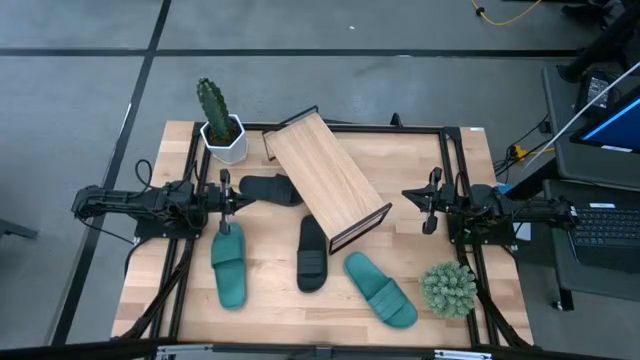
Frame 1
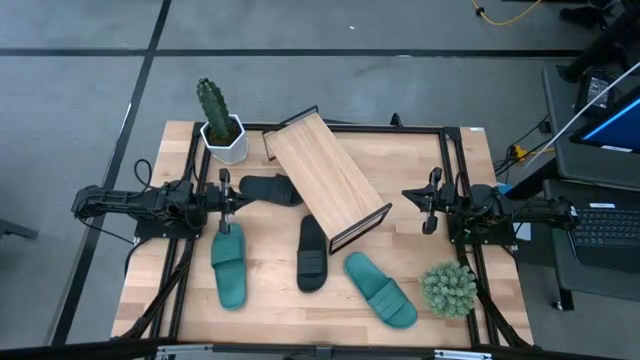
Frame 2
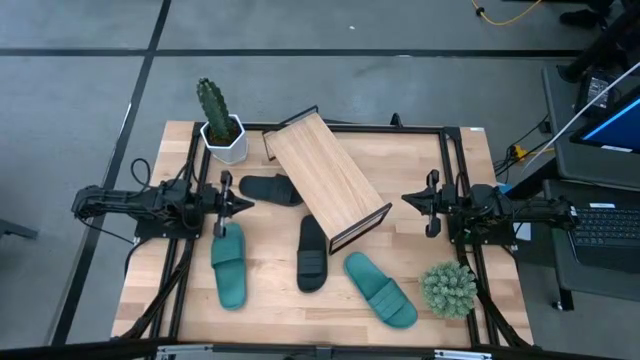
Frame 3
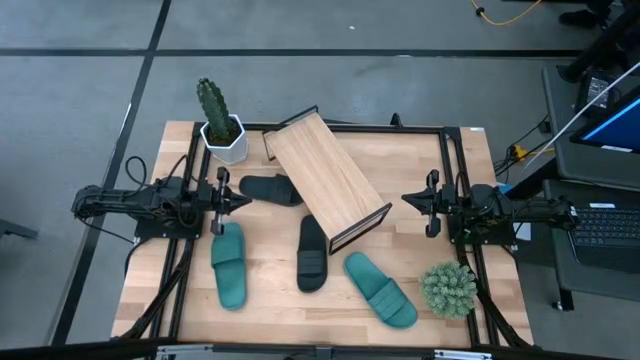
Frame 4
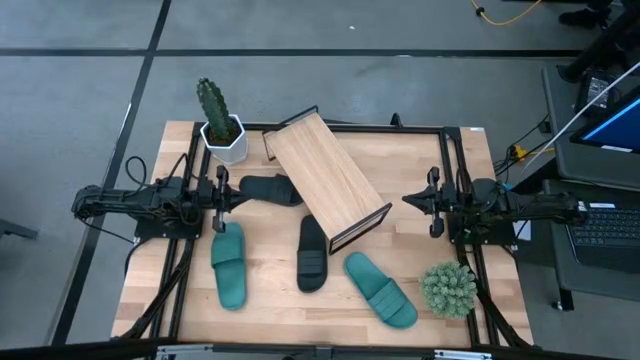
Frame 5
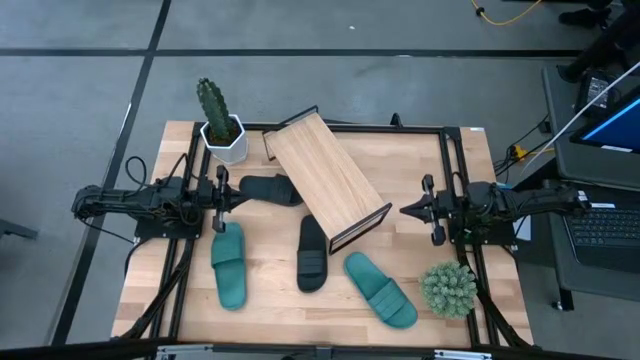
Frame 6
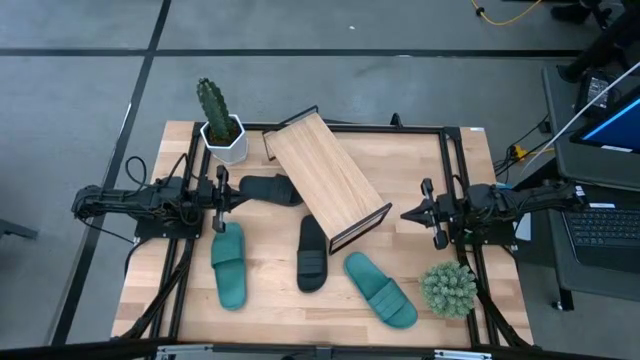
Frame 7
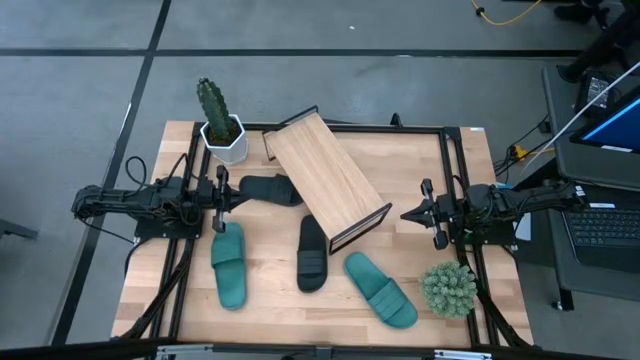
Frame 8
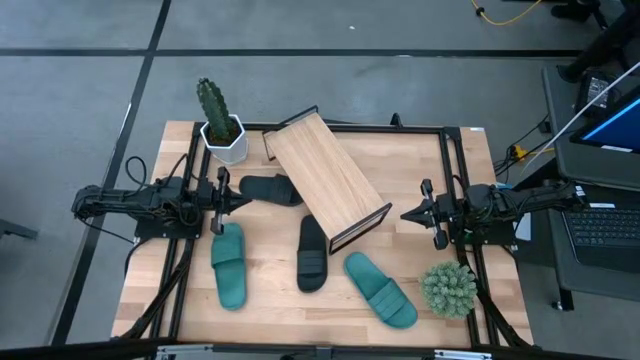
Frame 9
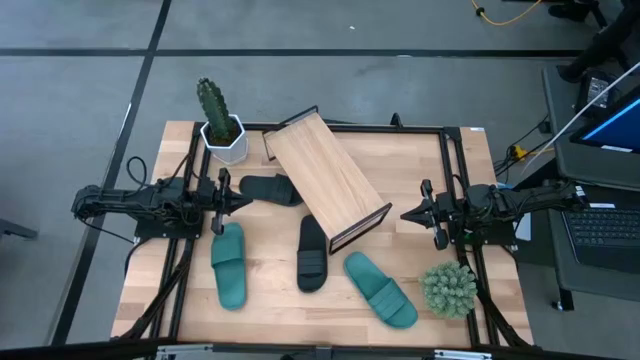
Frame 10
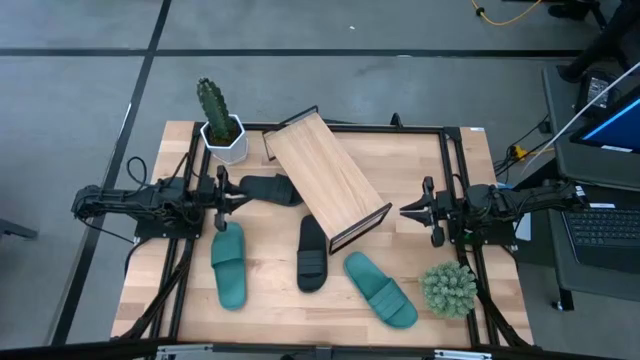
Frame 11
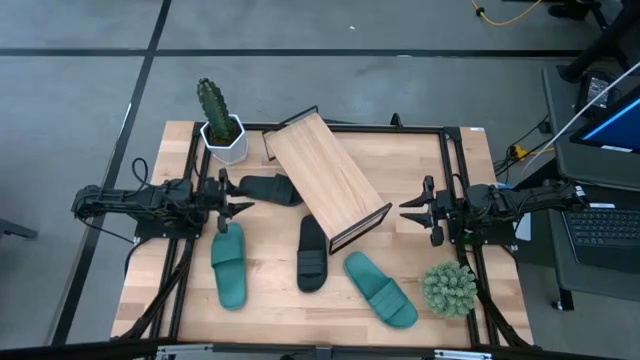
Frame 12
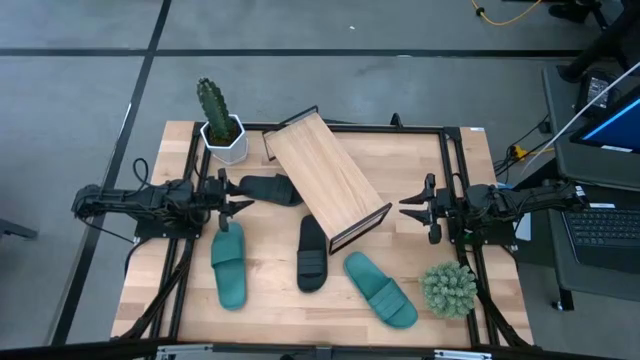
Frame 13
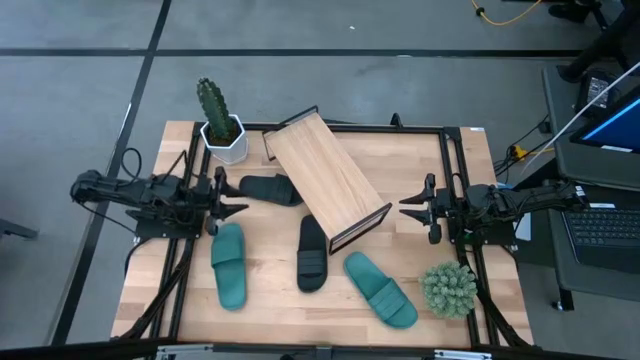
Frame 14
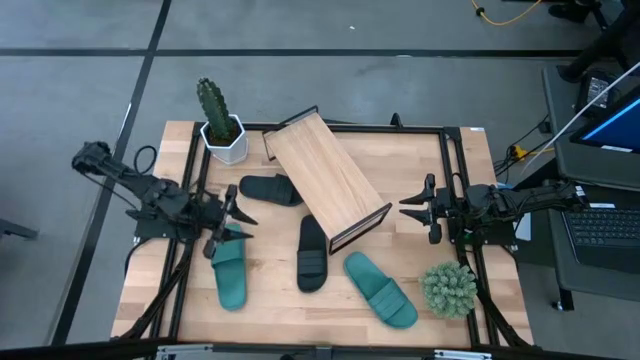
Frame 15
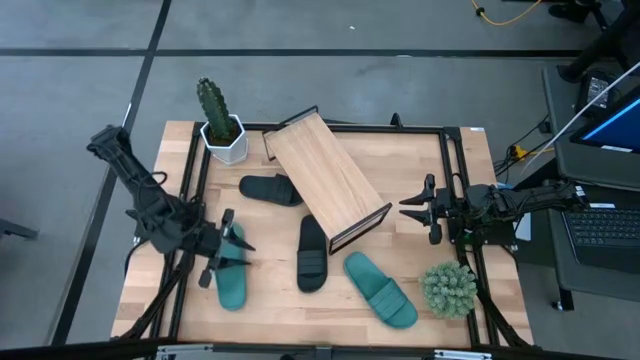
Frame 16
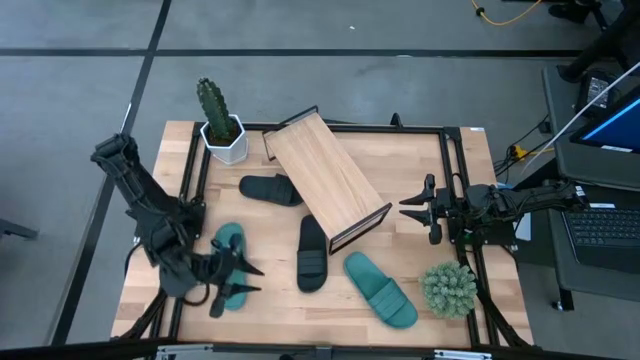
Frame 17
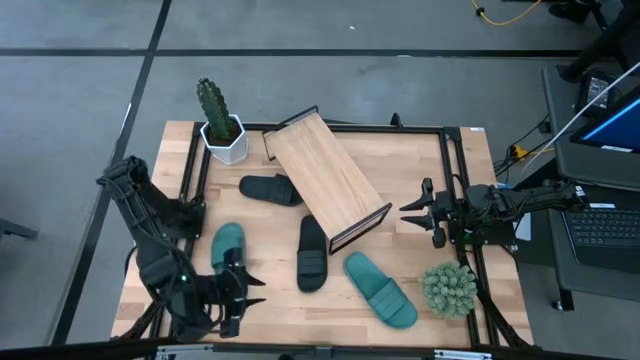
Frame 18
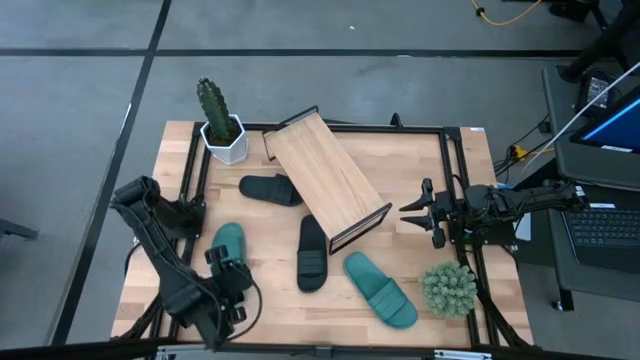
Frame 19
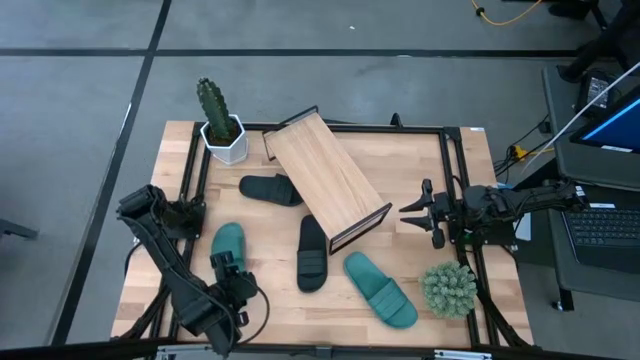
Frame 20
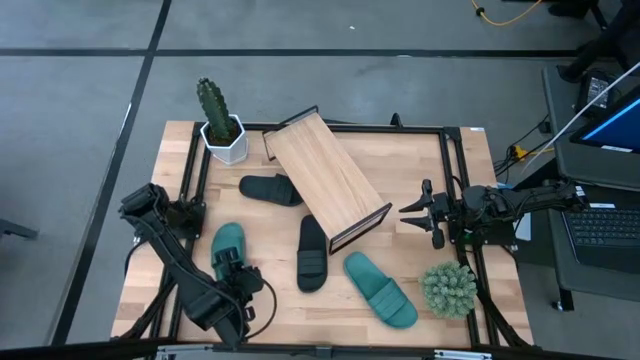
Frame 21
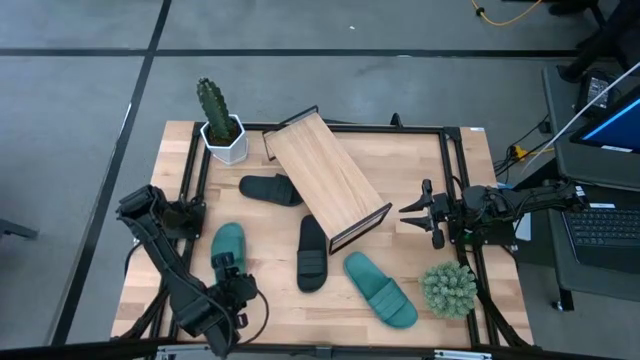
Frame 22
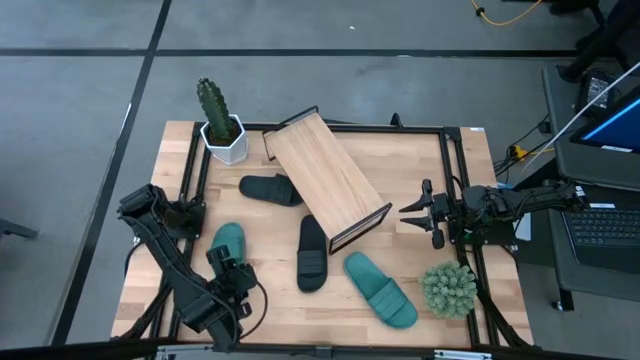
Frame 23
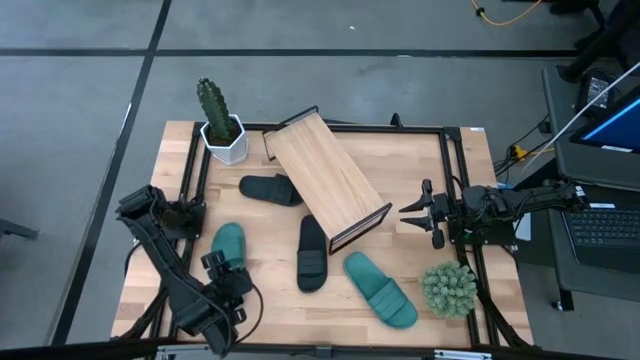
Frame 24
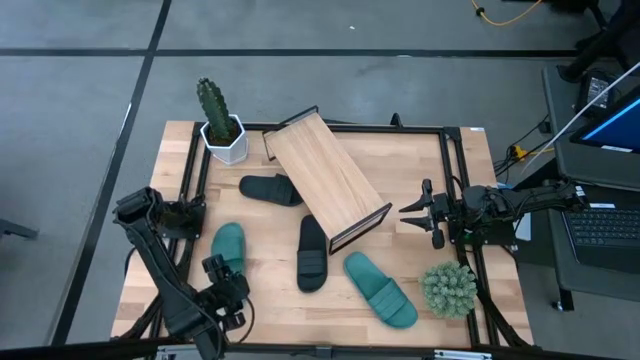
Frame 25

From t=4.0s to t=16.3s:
Task: Pick and place slides into the shelf
Put the left green slipper onto the shelf

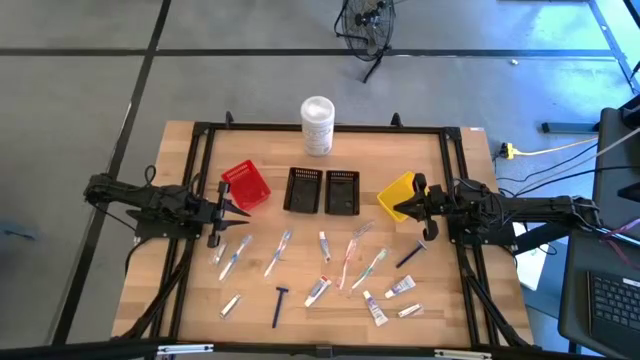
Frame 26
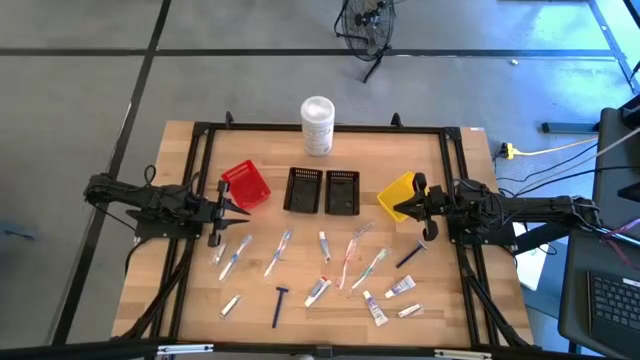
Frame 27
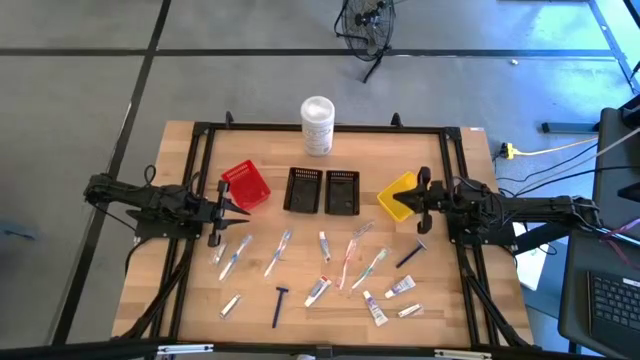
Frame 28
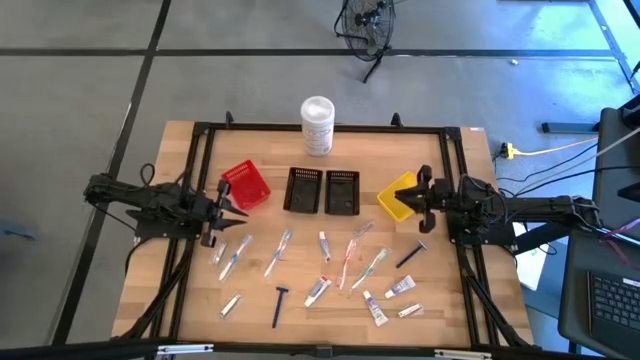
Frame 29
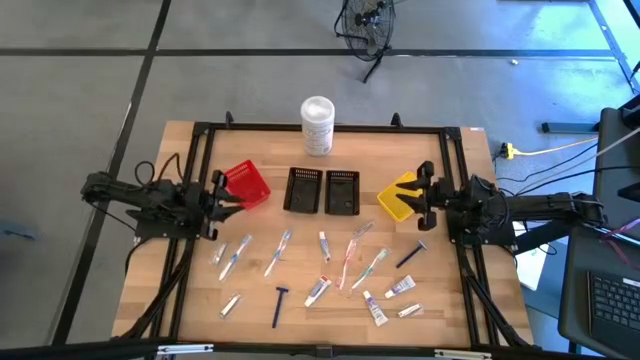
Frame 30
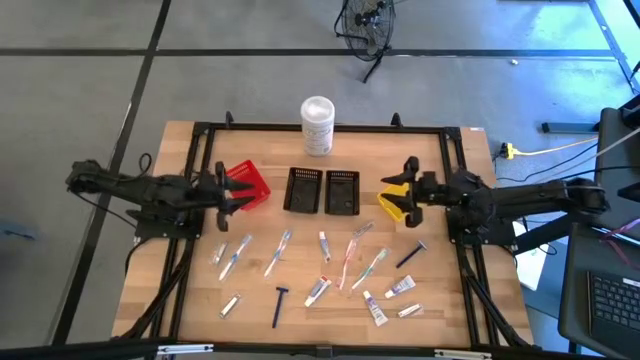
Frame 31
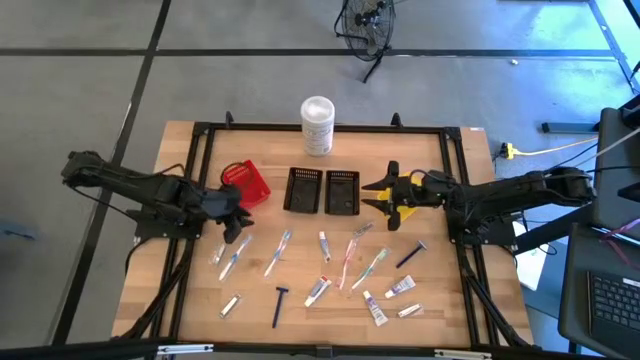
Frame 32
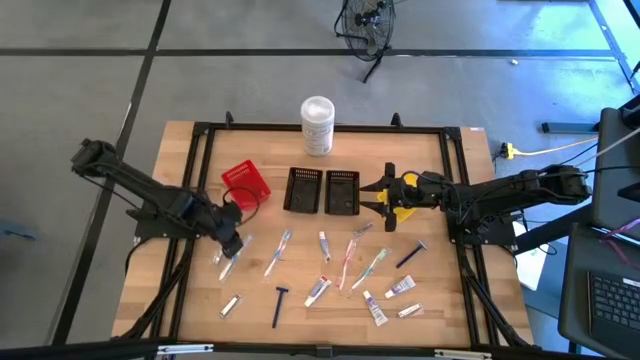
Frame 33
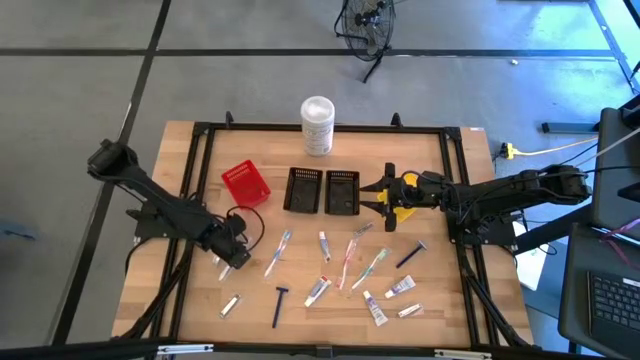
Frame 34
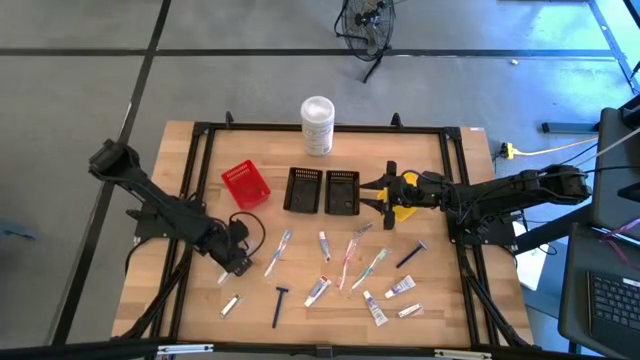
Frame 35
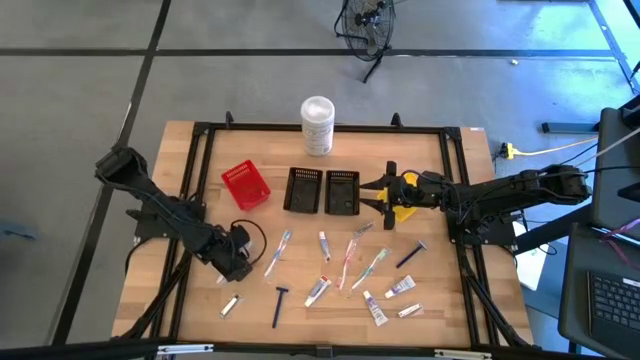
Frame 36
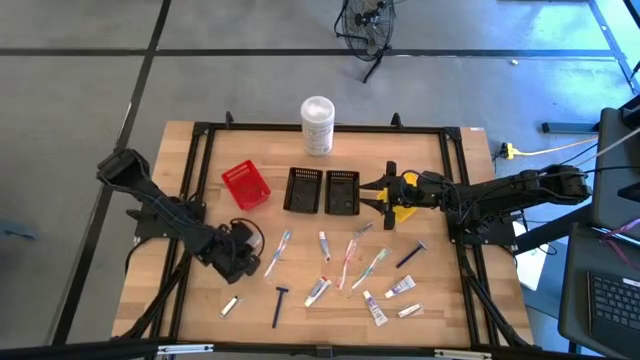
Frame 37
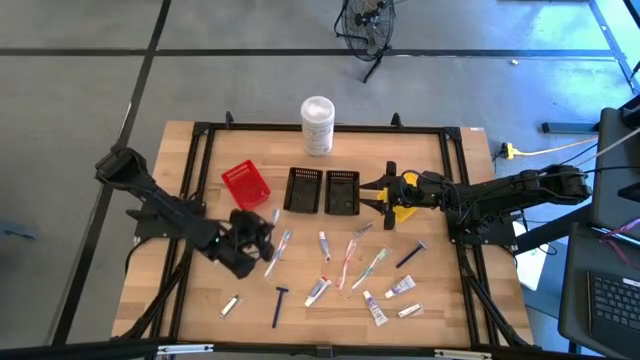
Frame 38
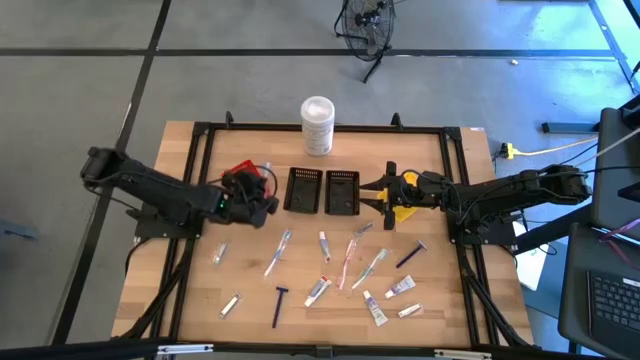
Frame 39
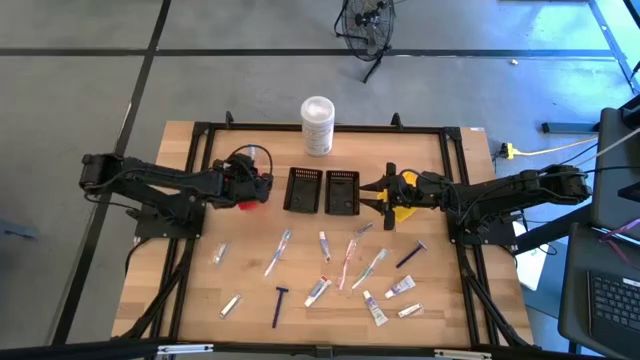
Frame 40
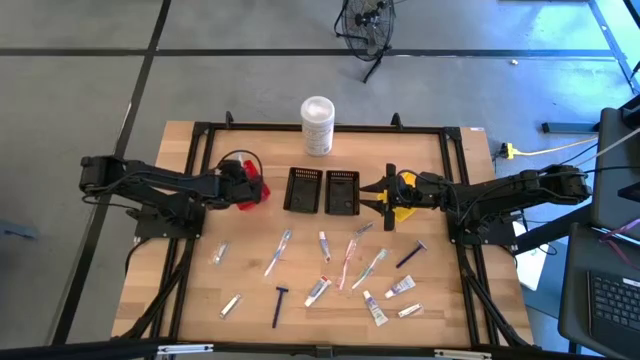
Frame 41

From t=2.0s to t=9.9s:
Task: Pick & Place Travel size toiletries
Put the blue toothbrush into the red bin
